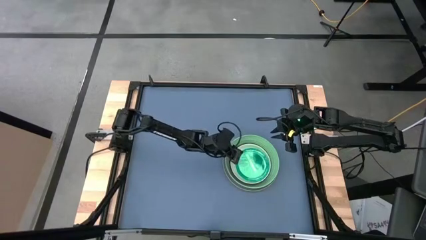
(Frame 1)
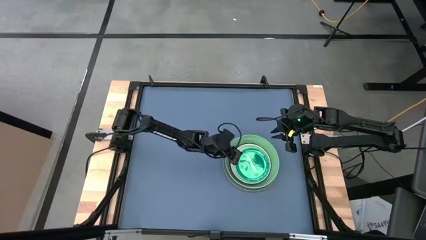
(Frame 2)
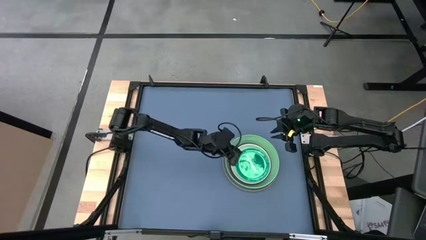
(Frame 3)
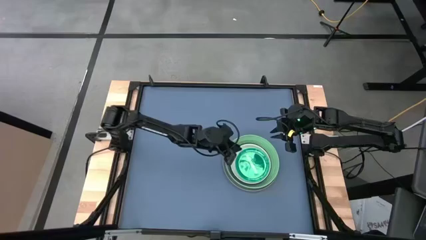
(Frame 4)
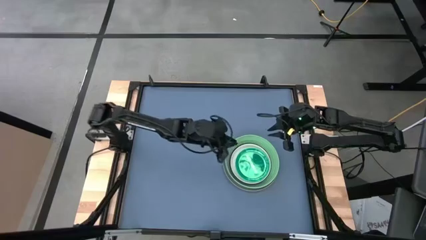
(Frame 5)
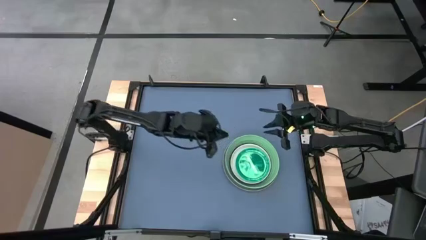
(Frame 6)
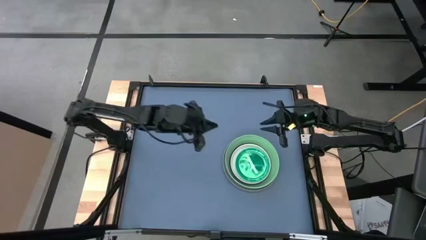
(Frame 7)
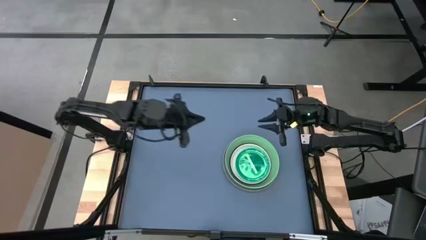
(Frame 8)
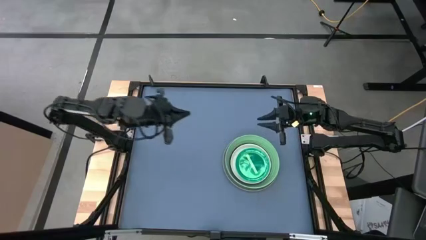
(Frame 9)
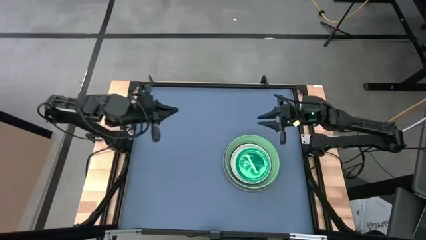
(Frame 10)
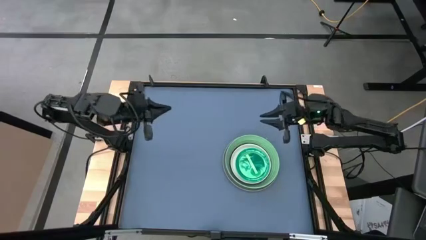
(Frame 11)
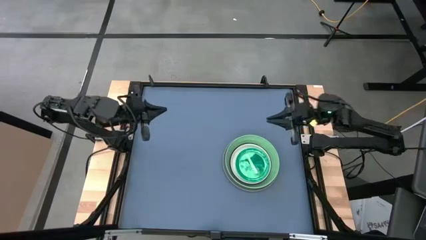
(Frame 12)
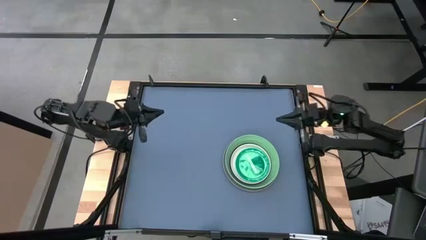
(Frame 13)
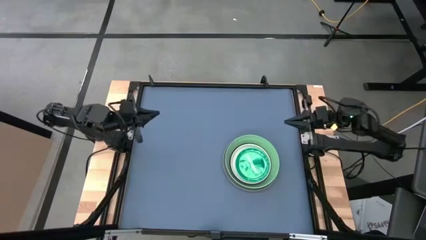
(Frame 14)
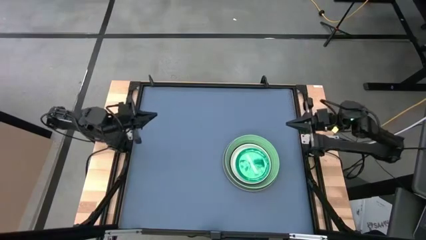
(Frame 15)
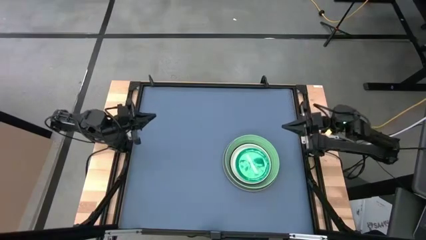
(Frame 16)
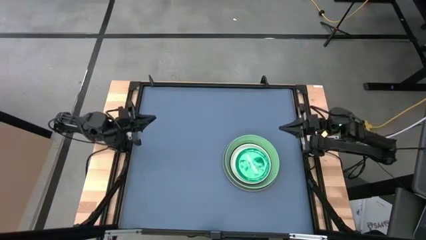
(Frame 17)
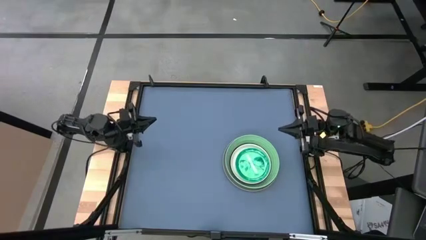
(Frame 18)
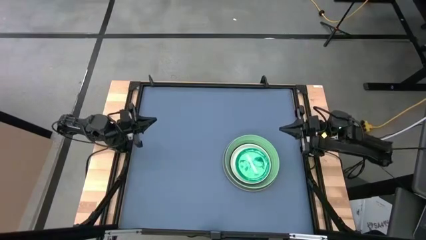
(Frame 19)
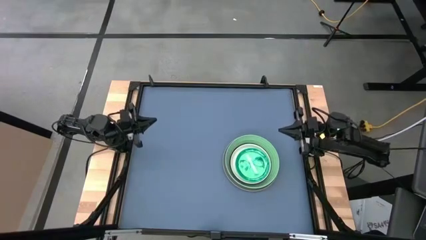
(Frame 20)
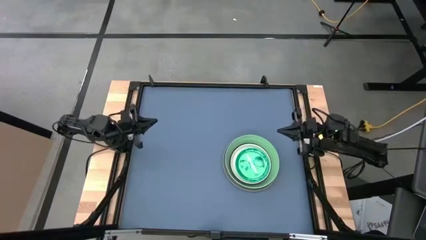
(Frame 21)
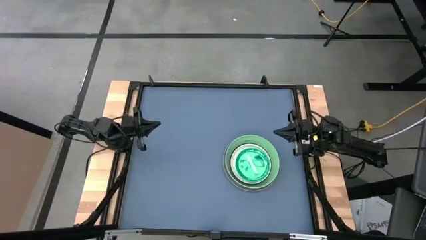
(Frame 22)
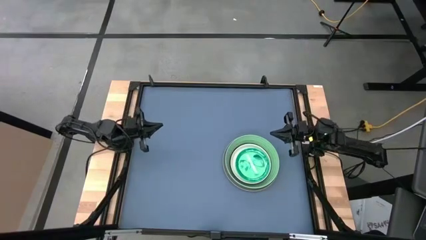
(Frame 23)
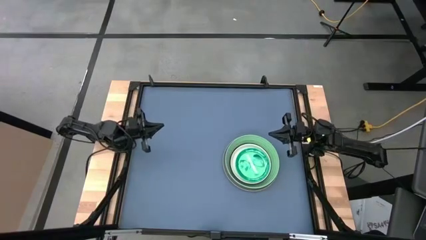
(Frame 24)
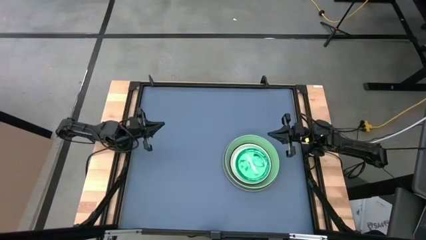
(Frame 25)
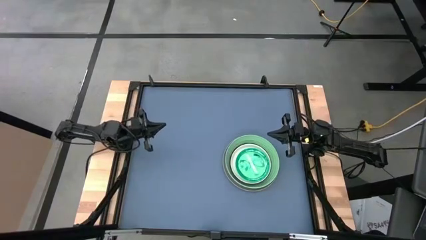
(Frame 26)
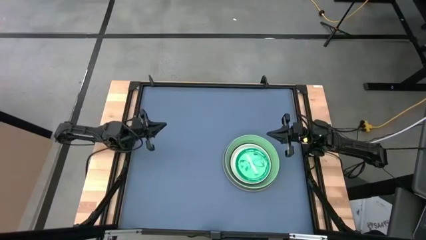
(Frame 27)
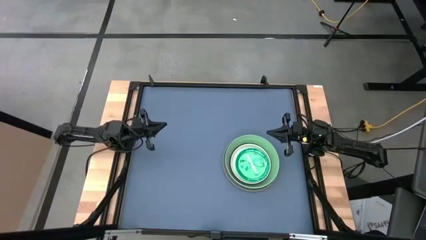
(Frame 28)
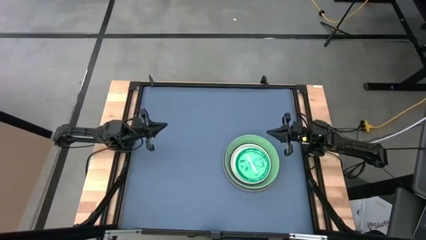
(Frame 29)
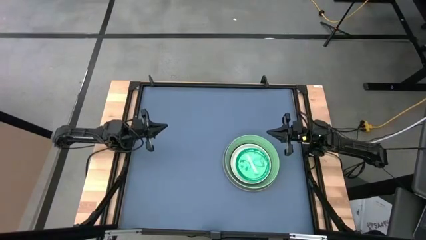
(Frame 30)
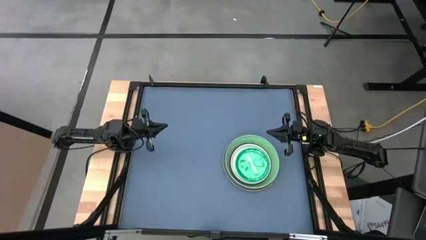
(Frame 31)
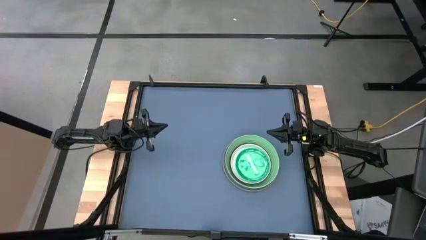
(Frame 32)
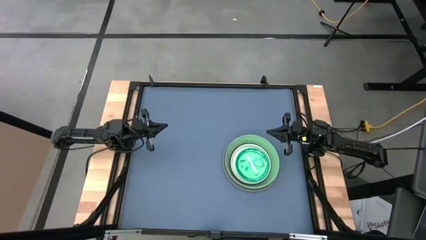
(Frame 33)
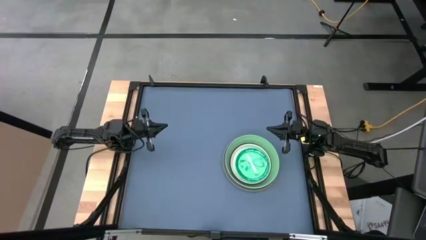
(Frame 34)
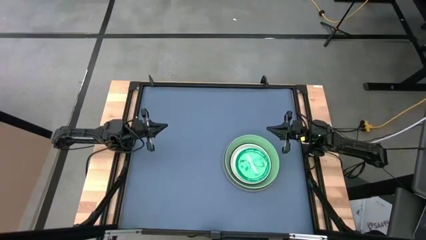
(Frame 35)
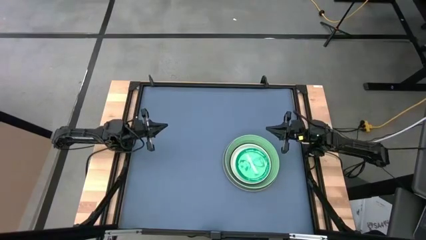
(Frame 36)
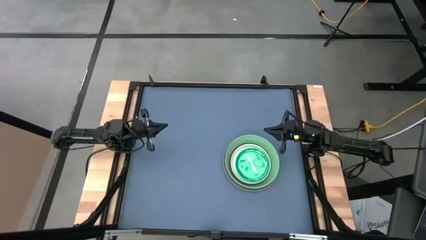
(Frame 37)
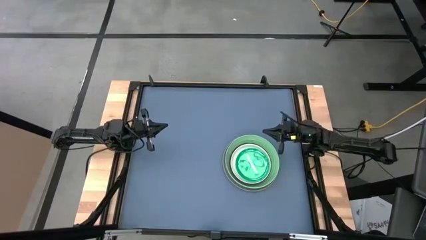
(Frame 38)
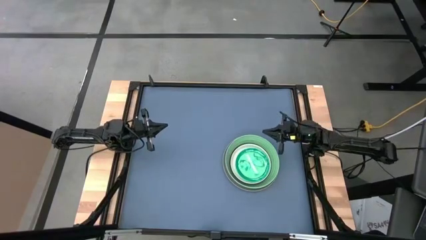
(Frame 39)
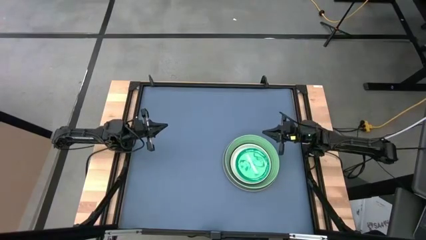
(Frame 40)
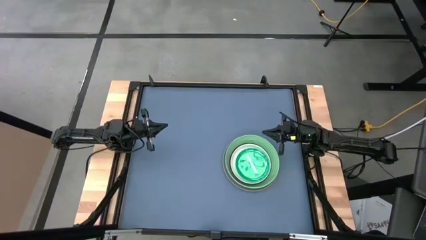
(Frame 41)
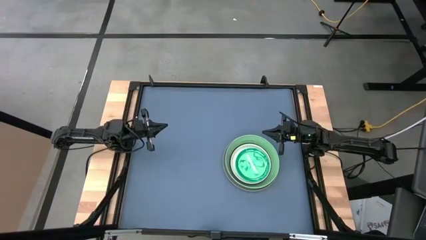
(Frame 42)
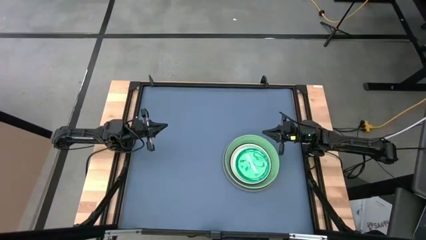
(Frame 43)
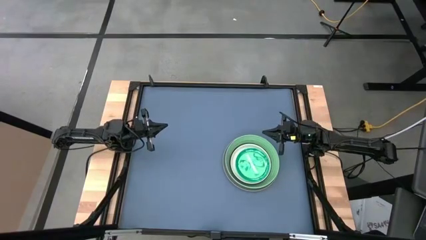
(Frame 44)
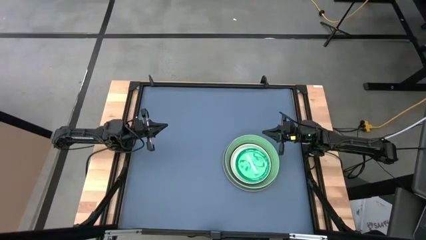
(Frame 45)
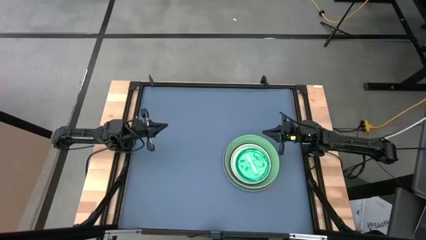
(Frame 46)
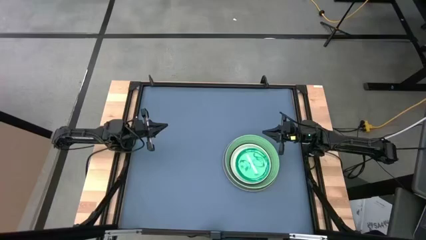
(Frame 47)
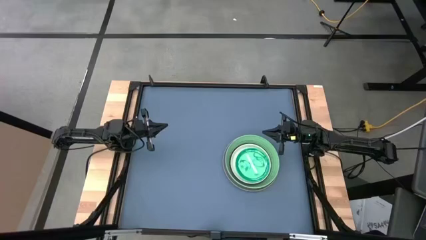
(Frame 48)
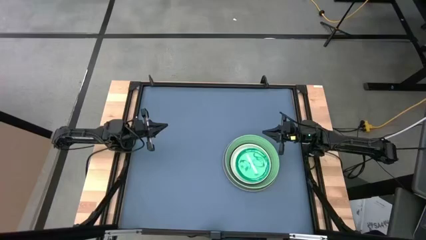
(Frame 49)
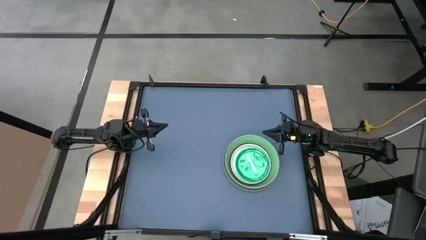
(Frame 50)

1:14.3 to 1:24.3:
Task: Stack plastic plates
Return to Home Position
